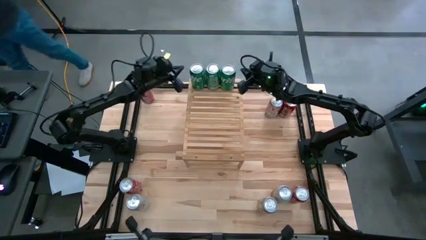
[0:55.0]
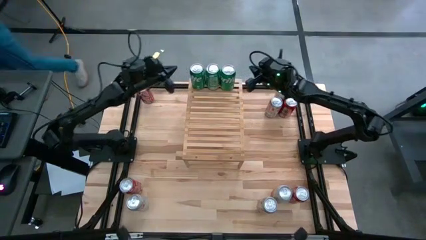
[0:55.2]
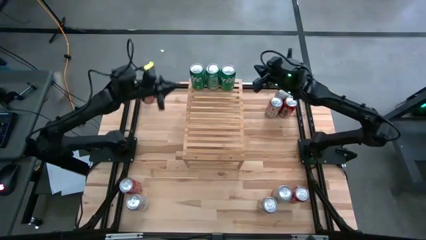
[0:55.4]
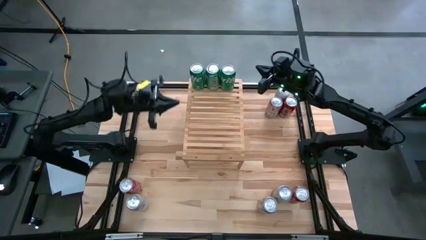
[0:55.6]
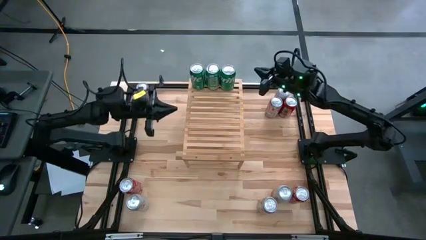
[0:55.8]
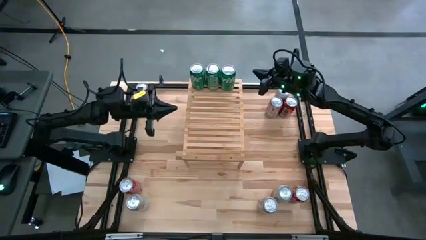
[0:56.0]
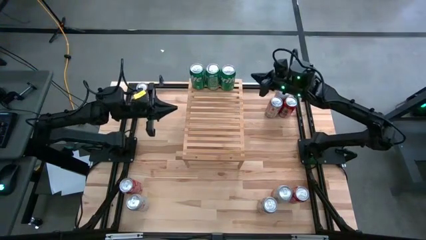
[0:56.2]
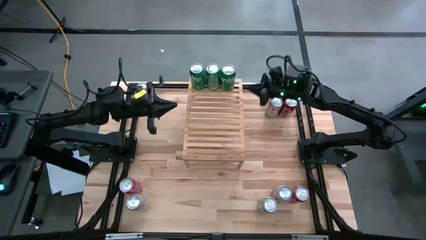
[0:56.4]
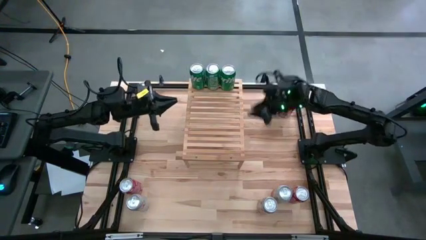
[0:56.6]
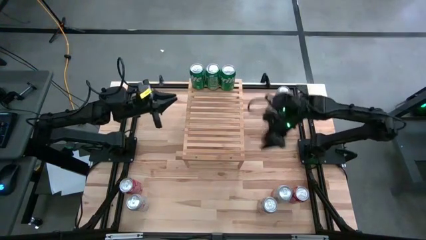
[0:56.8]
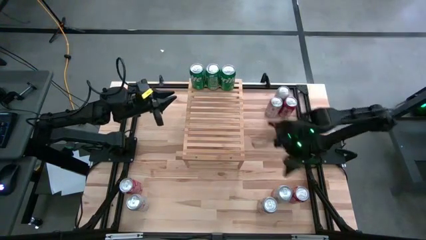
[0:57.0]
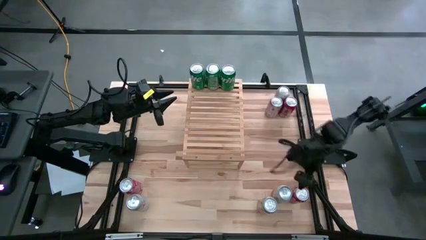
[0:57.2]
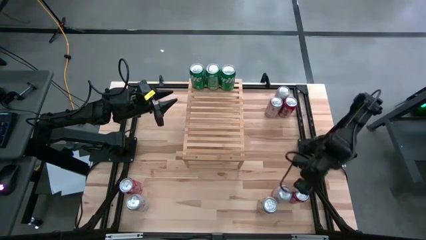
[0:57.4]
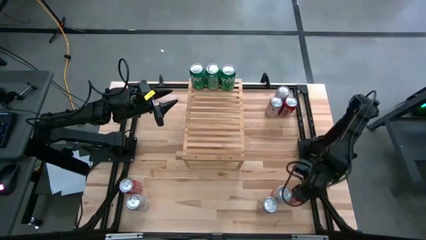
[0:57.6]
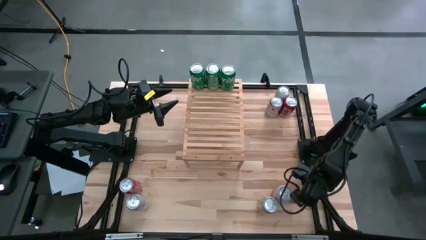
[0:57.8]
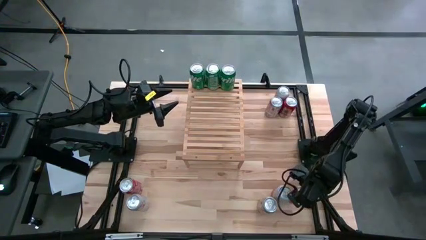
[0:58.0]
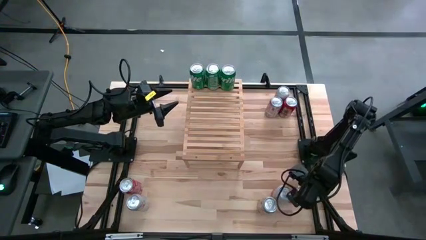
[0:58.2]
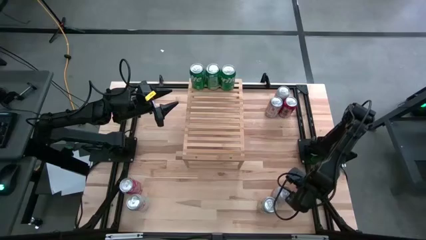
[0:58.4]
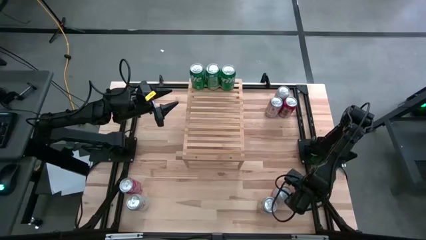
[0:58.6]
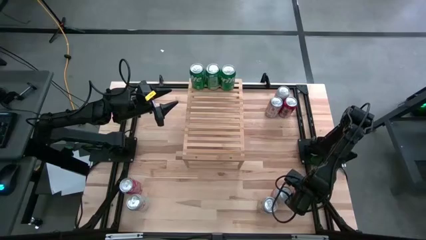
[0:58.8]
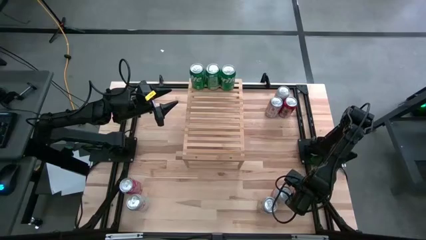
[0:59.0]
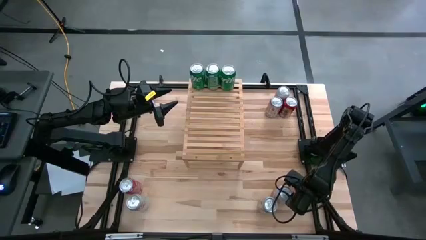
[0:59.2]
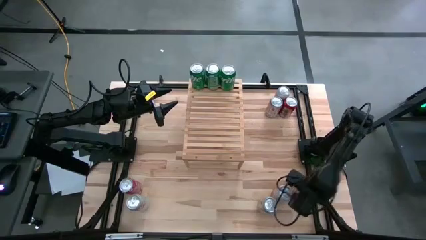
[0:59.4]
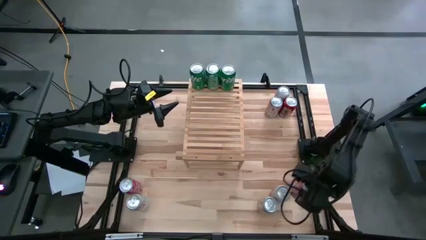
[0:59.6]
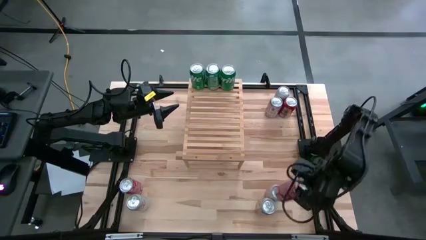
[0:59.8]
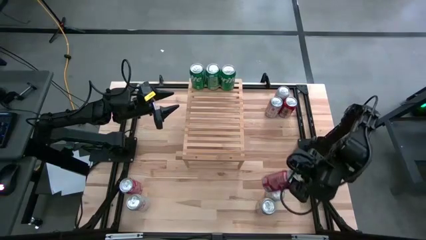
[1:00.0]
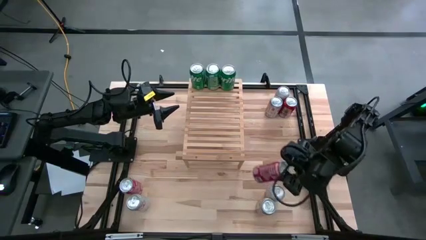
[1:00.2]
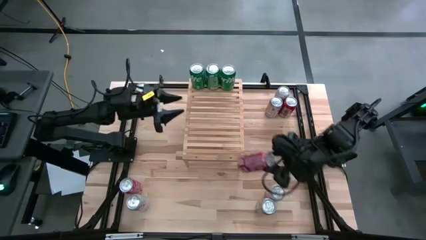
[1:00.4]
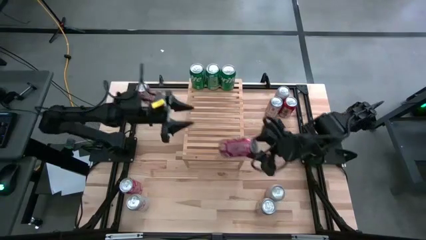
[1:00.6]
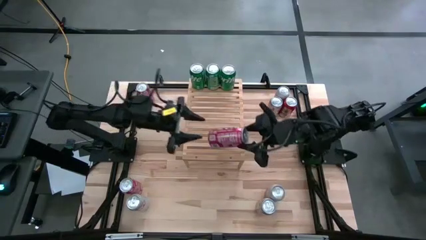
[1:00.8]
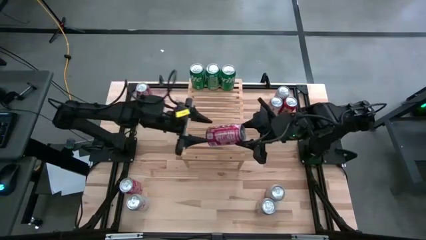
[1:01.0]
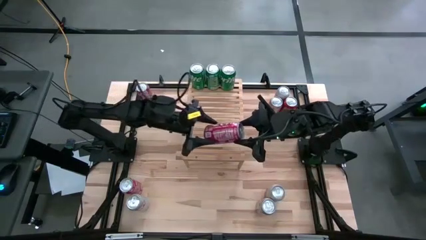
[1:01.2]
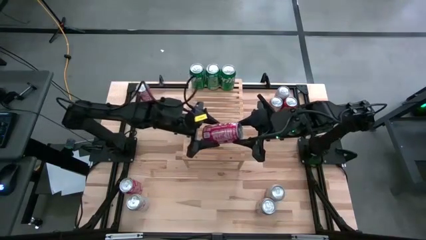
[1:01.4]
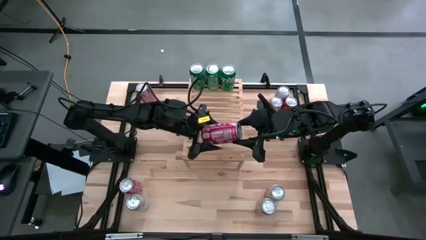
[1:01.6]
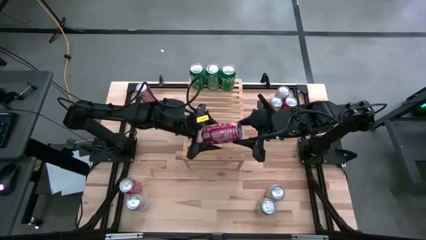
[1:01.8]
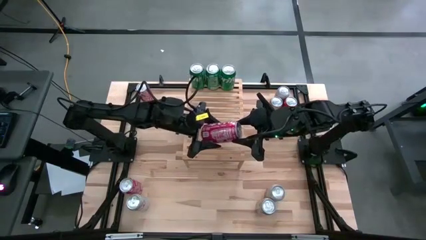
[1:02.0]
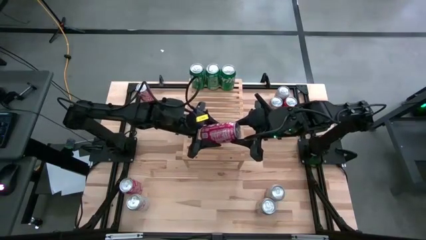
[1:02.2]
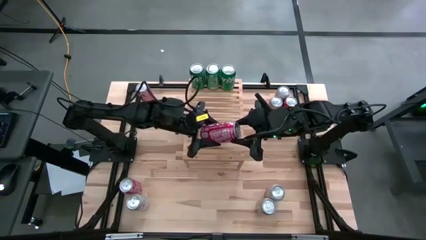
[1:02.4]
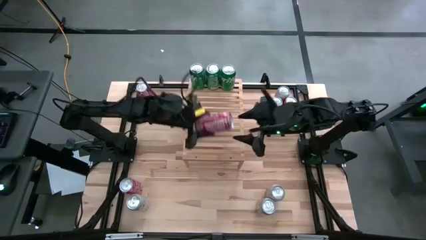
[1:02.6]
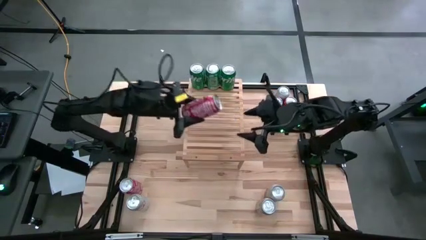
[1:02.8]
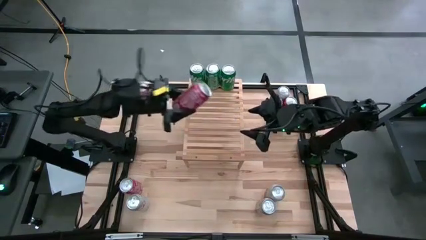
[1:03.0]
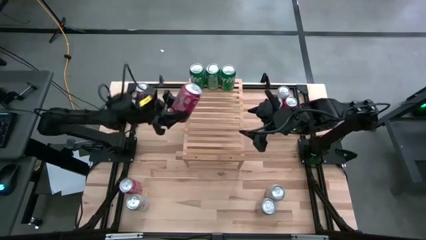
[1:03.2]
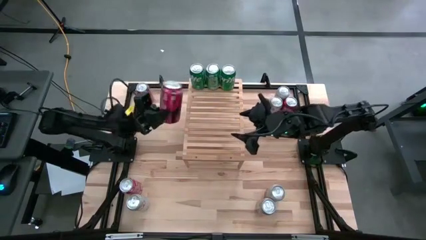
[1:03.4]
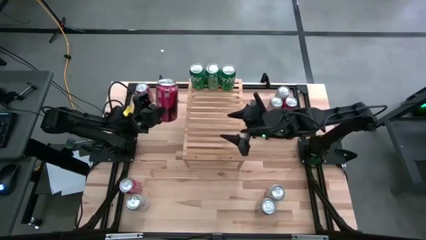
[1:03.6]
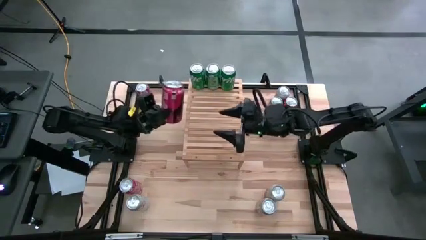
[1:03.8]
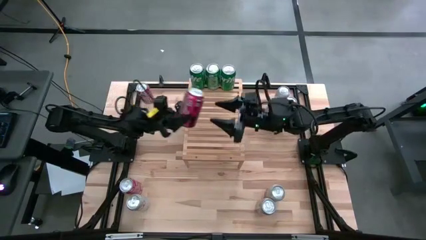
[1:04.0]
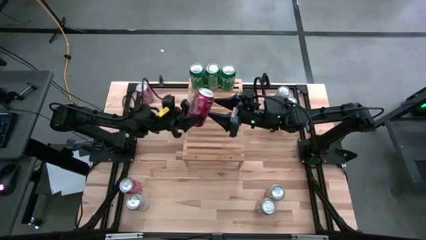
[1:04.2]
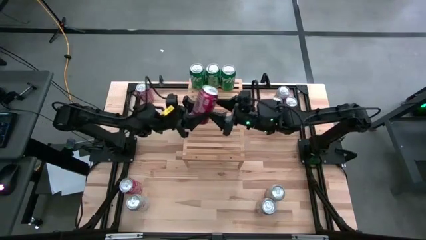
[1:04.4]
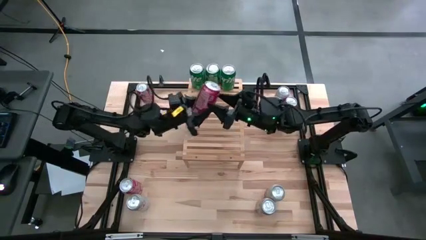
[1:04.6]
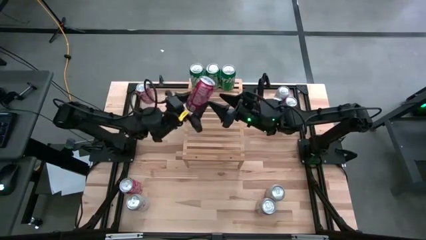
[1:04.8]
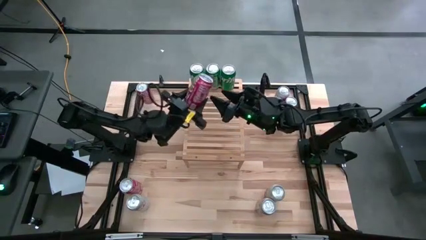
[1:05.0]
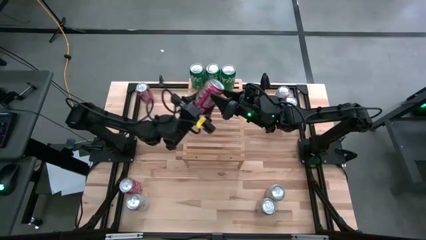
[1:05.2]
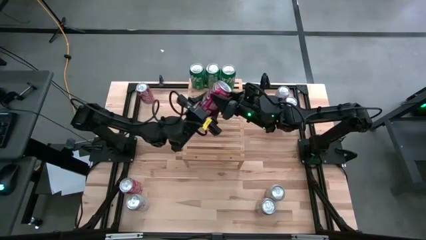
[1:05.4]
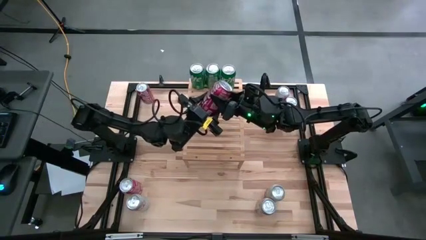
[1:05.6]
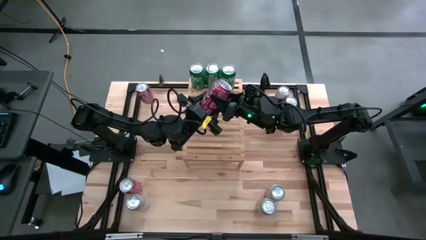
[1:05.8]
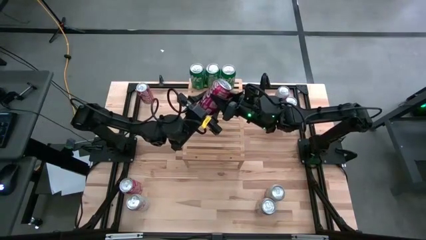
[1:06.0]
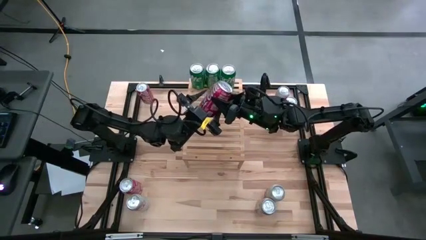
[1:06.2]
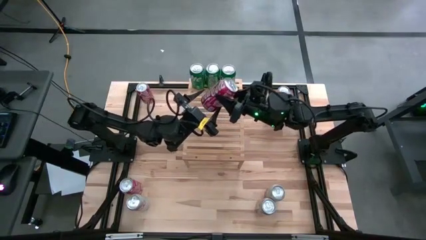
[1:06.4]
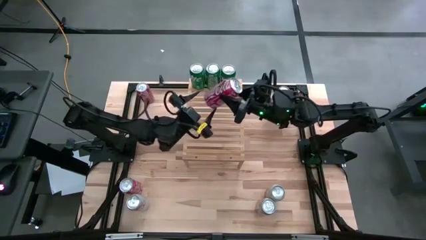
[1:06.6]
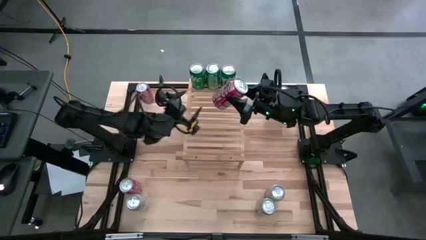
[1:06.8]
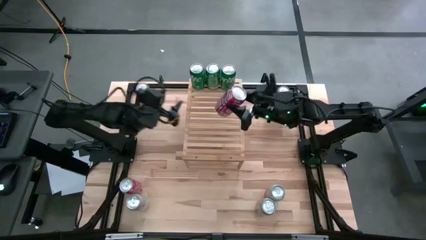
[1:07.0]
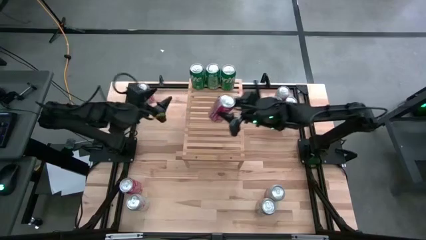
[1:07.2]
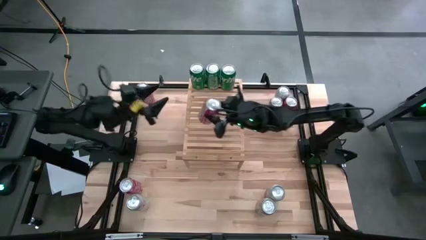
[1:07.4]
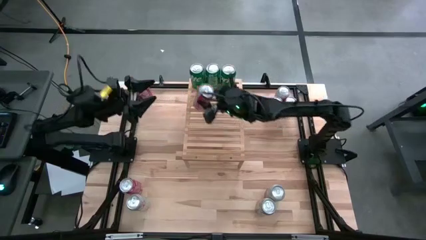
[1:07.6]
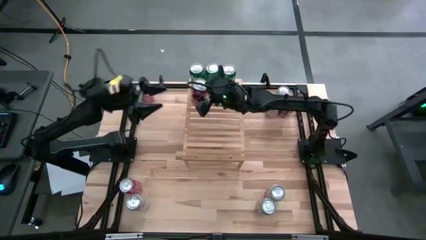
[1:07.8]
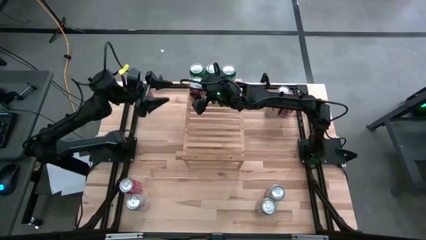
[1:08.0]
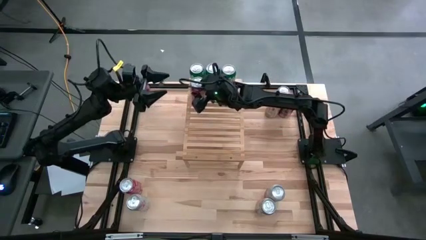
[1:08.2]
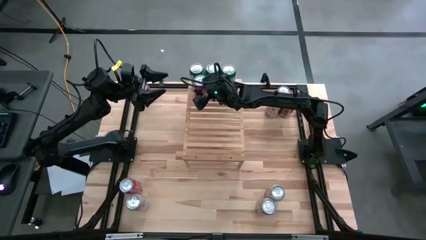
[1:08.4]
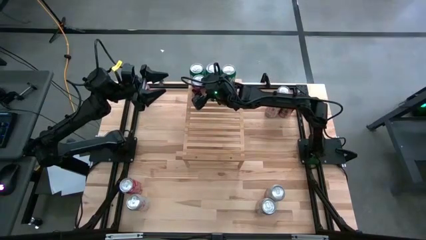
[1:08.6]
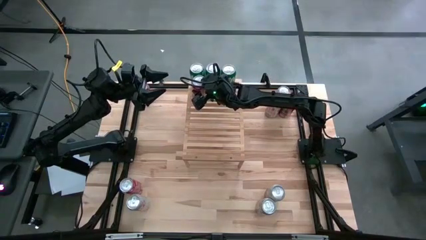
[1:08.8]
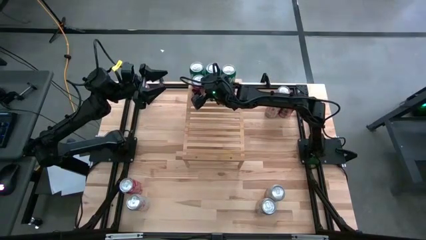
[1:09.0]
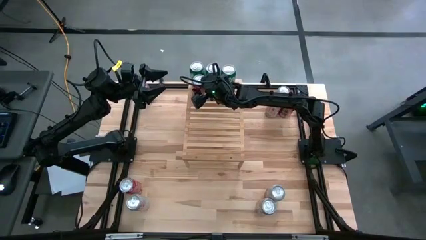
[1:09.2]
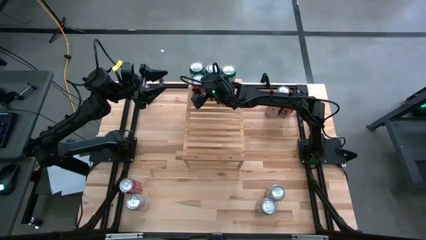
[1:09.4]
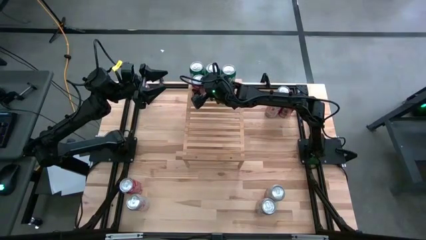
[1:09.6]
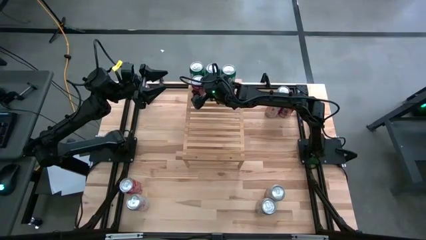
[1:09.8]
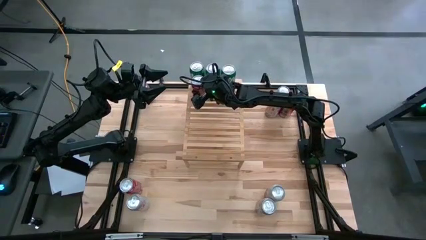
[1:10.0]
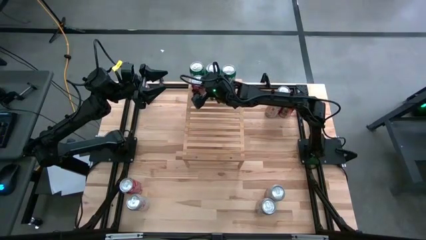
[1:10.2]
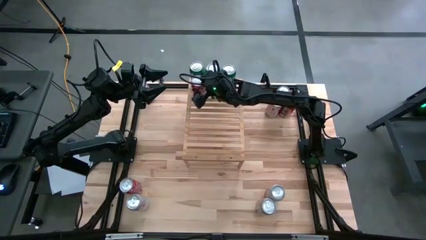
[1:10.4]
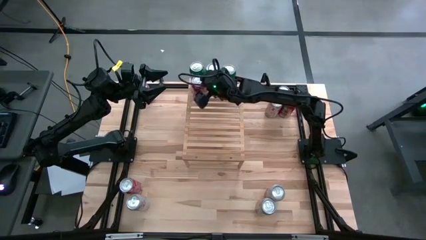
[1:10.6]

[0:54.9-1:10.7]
Task: Place canned beverage on shelf
Put the bottom right red soda can on the shelf

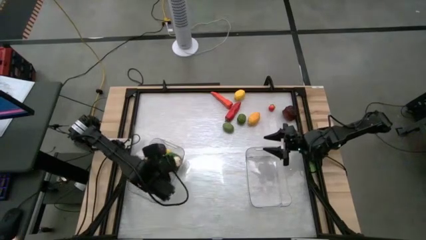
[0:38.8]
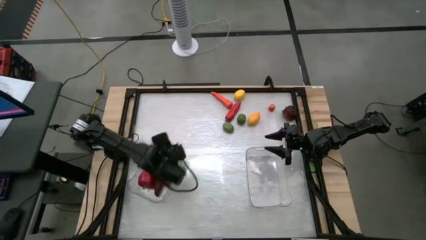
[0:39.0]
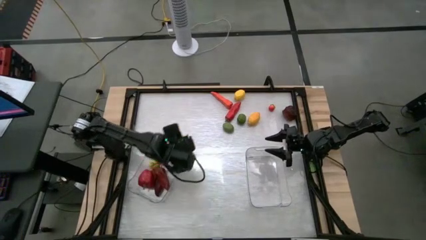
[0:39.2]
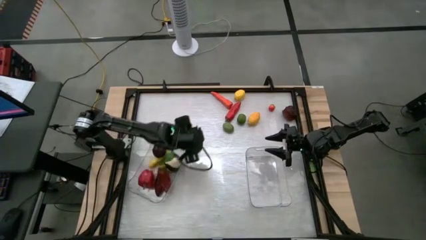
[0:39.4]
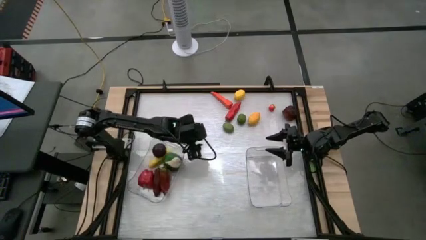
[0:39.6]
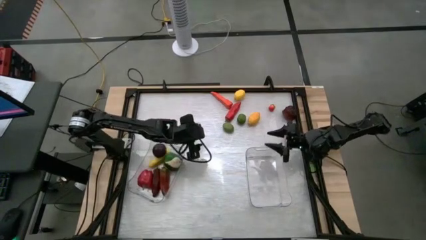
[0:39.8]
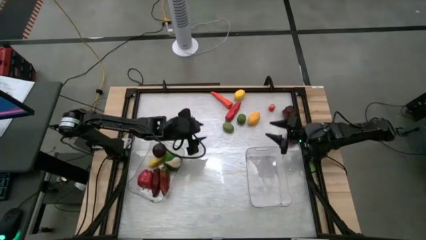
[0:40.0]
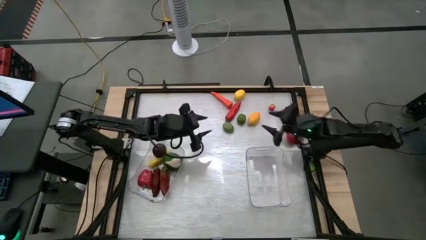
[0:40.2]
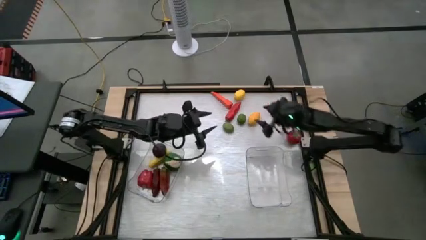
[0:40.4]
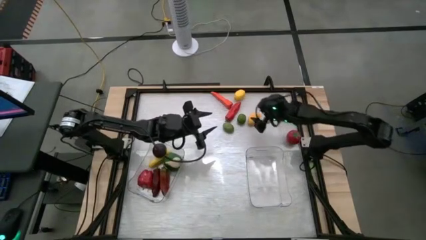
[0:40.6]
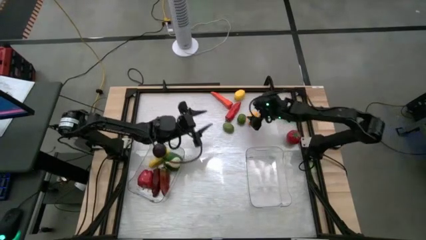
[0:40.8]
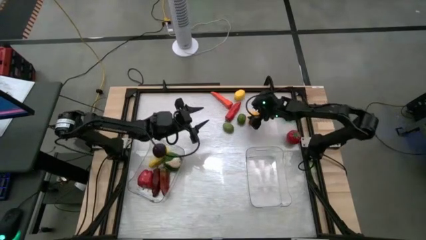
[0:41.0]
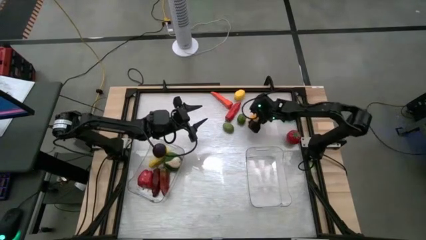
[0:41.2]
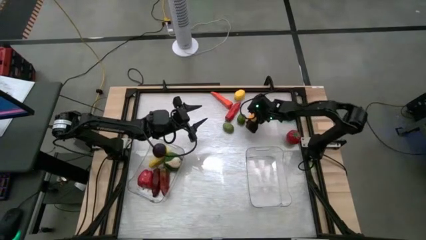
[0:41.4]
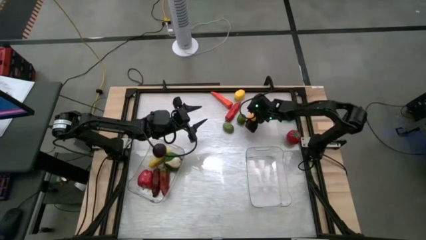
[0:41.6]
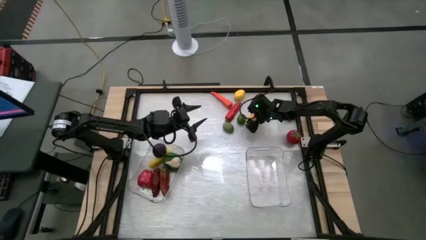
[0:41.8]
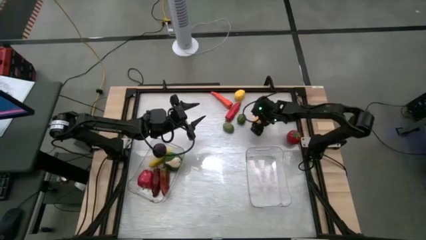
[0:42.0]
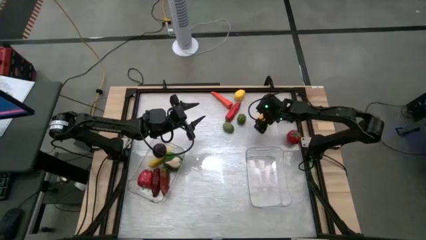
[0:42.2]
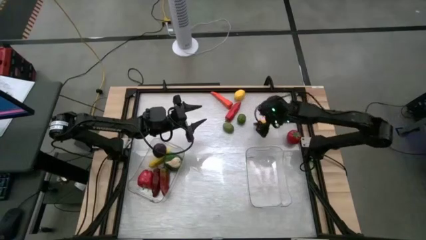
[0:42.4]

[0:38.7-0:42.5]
Task: Sort produce into baskets
Put the bottom yellow lemon into the right transparent bin
